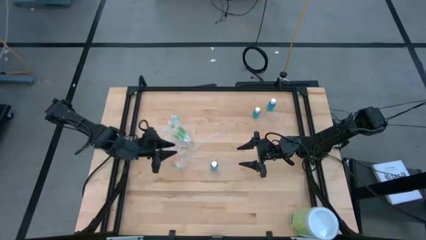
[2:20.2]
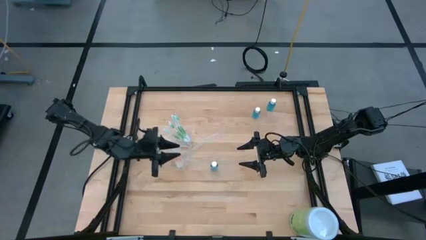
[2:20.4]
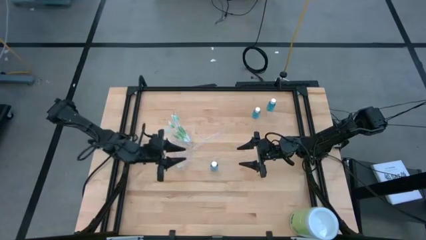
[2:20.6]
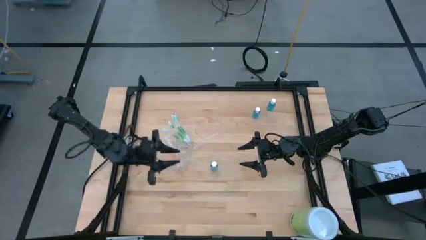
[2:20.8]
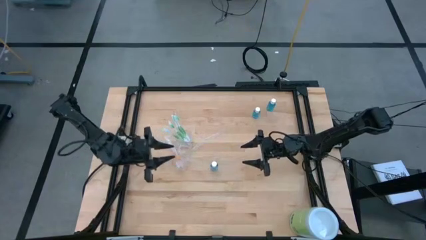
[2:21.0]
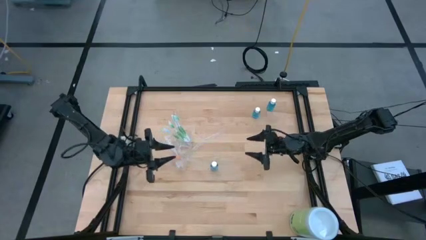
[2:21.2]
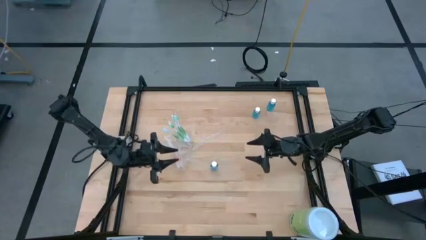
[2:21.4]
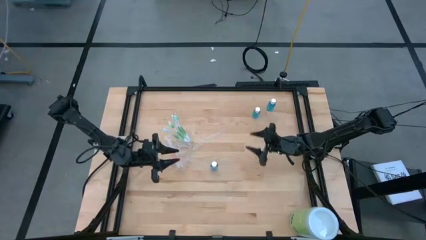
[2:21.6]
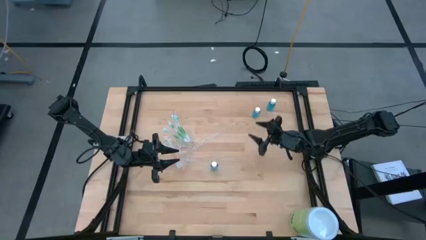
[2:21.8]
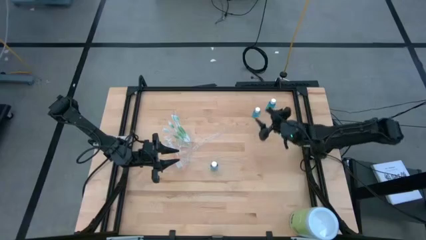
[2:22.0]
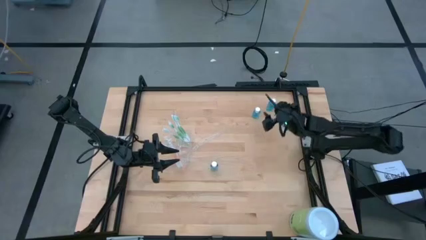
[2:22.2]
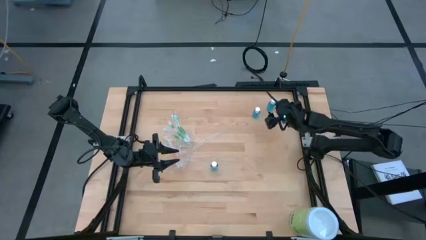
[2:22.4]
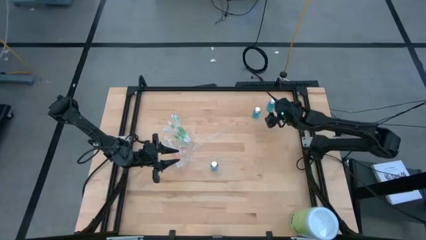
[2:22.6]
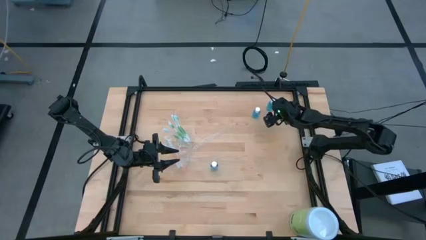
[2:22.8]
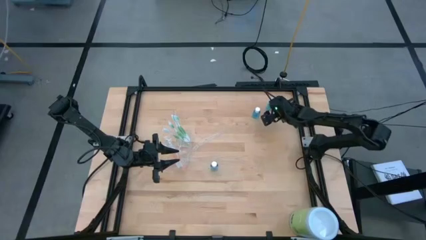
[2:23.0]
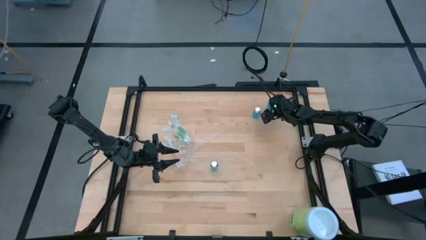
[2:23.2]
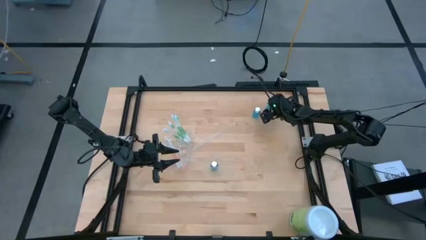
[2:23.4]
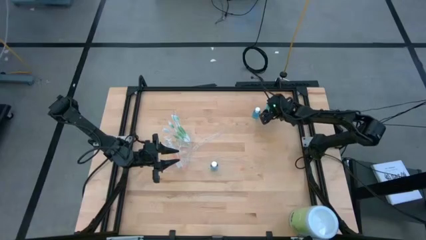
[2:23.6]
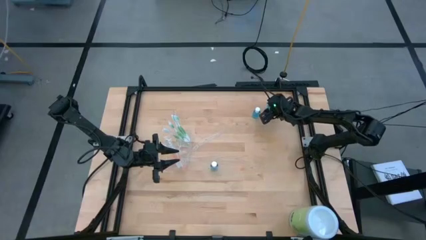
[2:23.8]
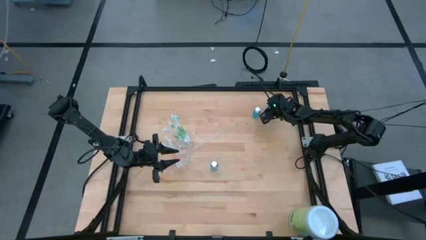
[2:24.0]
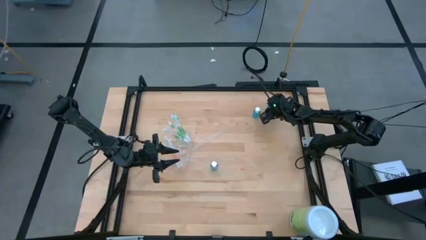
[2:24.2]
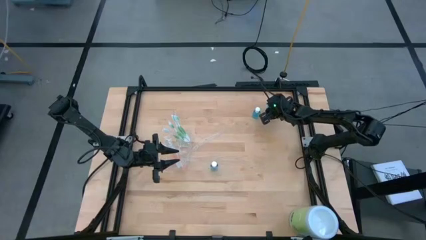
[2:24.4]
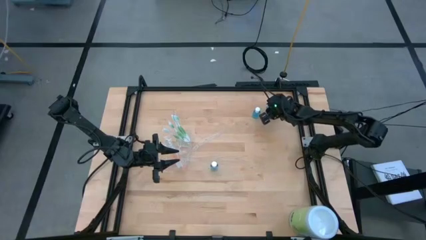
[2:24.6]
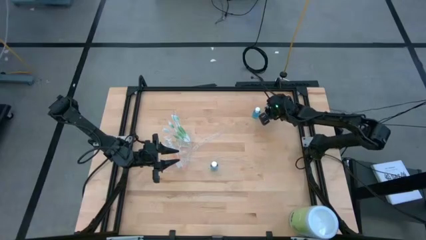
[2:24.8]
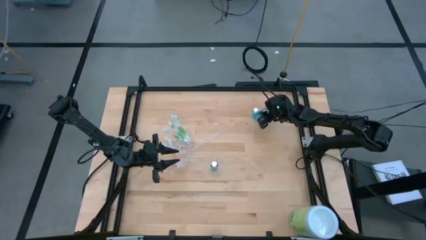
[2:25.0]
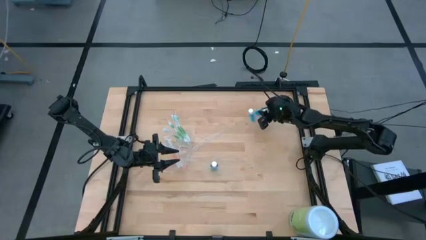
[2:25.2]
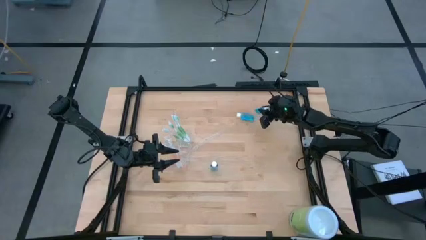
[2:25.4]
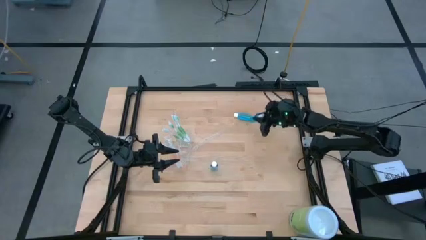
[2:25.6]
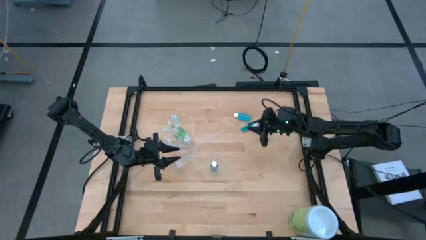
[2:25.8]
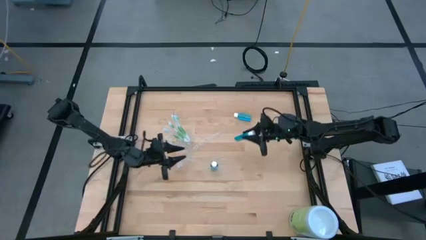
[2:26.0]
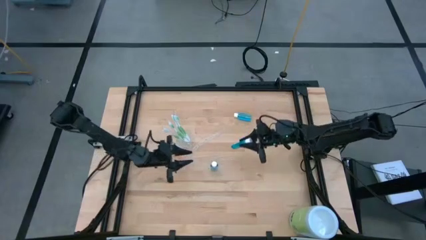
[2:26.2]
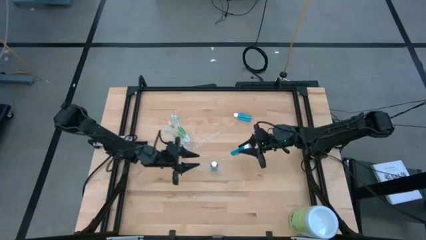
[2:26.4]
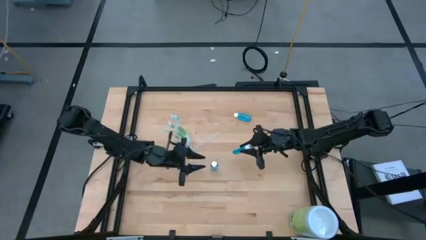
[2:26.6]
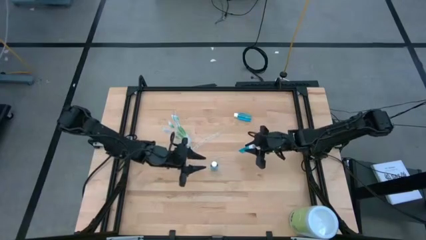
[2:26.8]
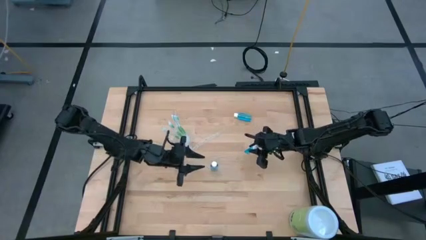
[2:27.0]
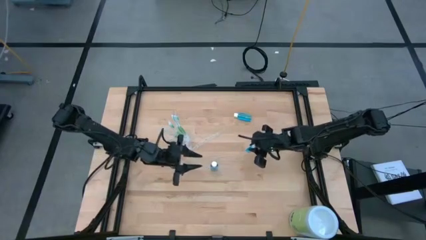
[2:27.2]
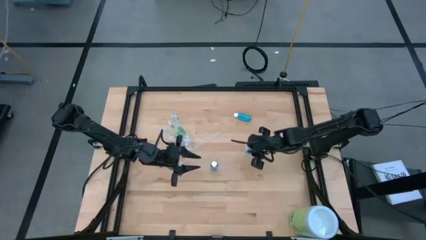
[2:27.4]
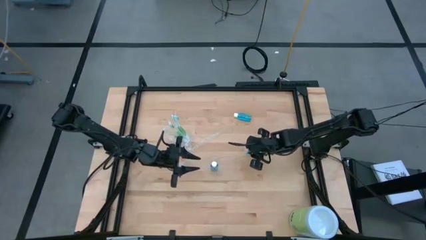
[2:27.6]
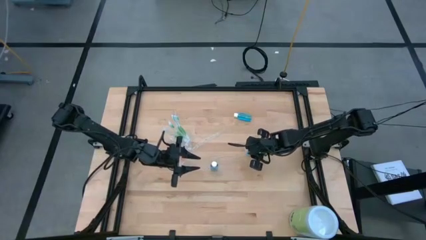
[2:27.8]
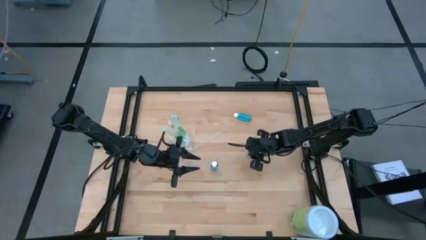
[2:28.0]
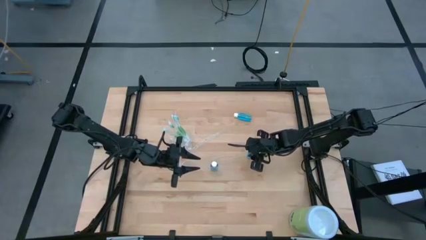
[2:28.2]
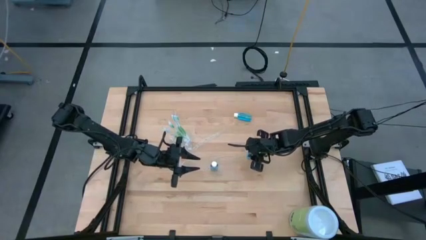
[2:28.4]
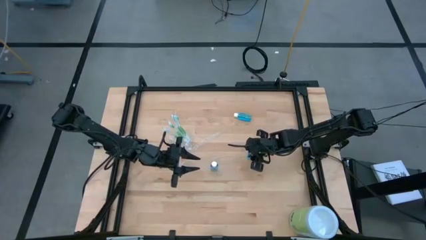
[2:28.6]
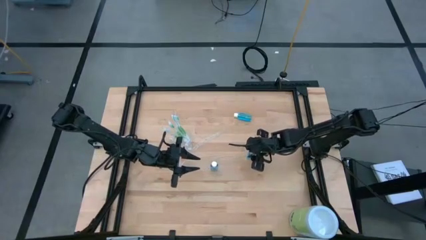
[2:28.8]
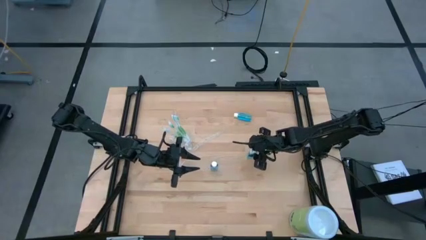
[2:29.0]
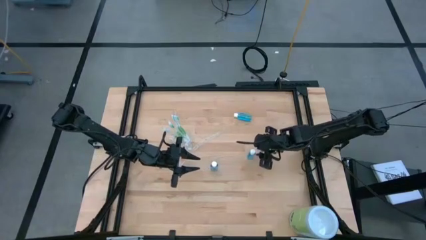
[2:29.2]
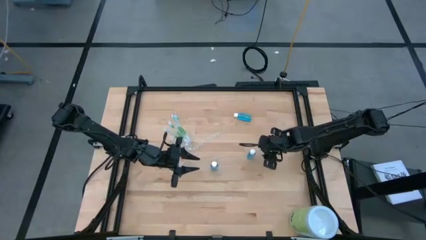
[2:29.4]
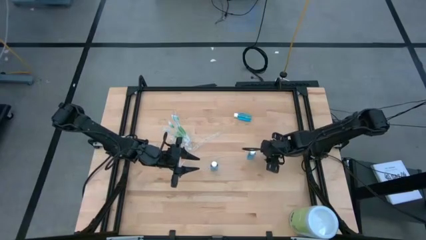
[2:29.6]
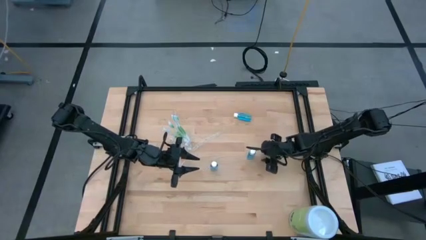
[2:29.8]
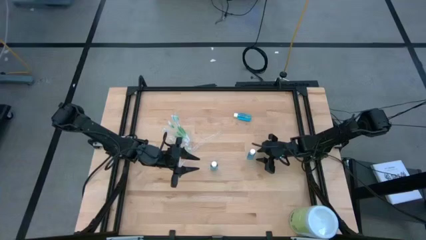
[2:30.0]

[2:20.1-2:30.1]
Task: Pick & Place toothbrushing station
Put the blue mouthwash into the middle section of the transparent organizer

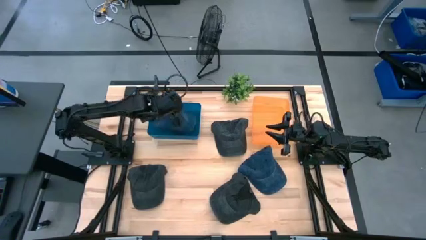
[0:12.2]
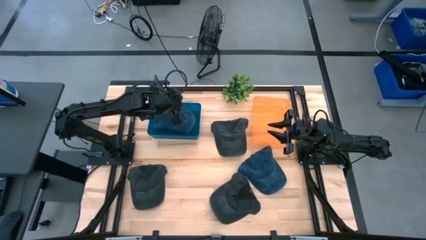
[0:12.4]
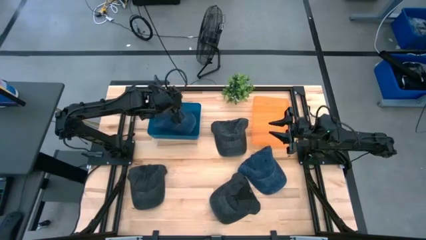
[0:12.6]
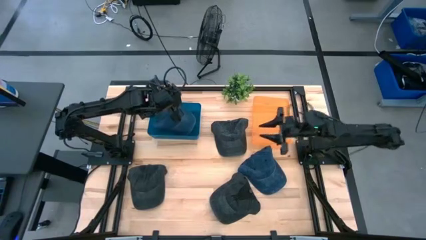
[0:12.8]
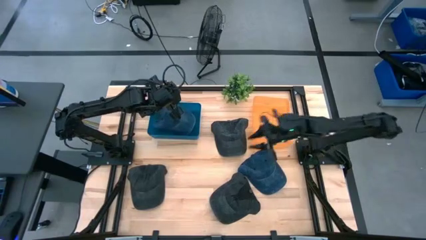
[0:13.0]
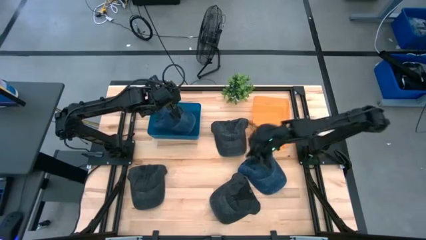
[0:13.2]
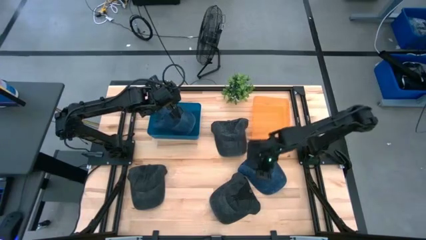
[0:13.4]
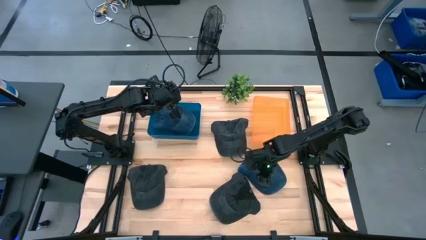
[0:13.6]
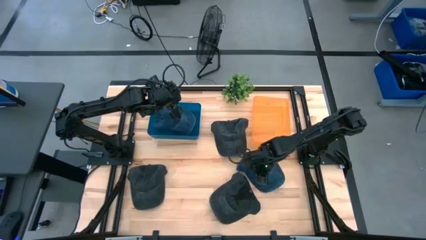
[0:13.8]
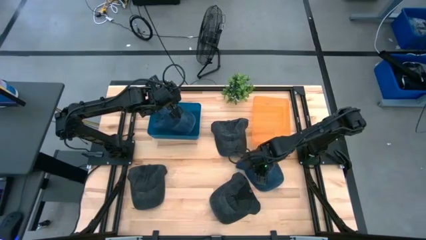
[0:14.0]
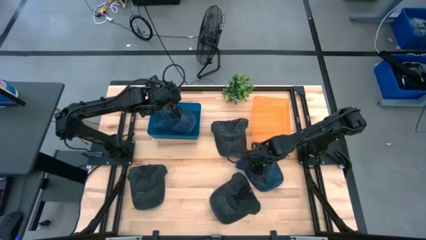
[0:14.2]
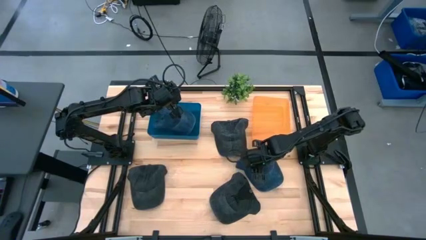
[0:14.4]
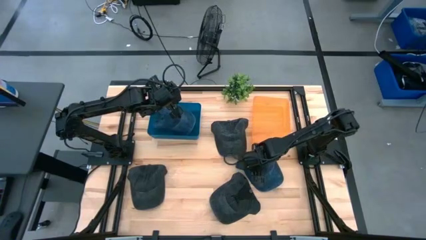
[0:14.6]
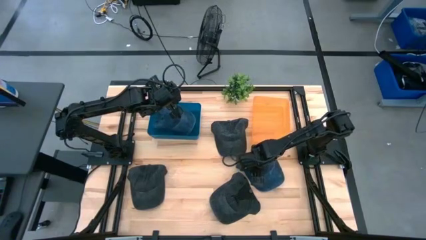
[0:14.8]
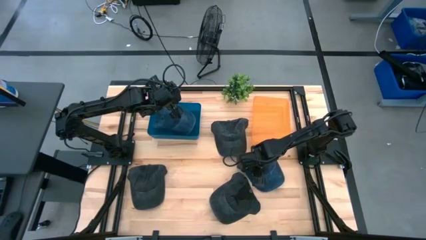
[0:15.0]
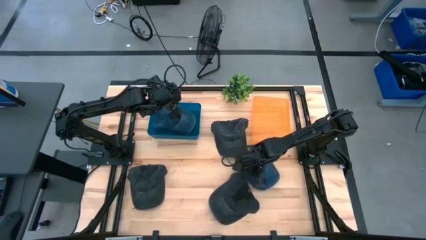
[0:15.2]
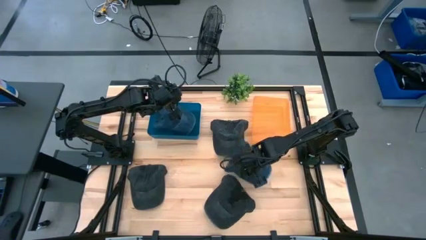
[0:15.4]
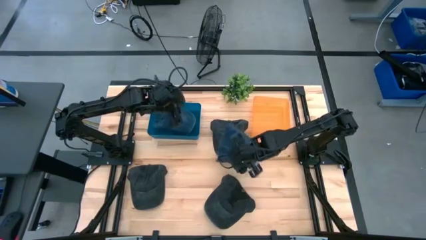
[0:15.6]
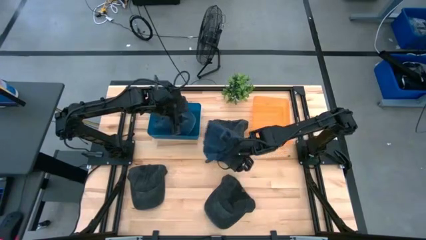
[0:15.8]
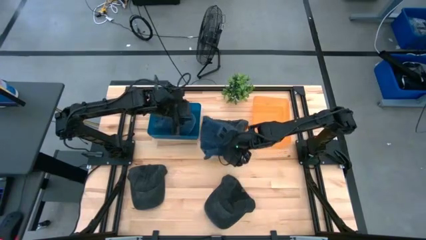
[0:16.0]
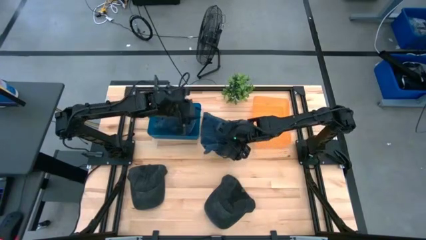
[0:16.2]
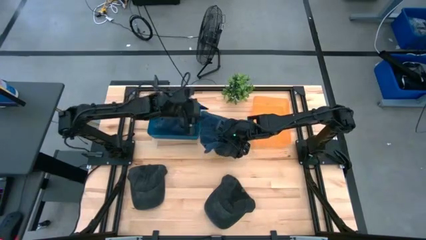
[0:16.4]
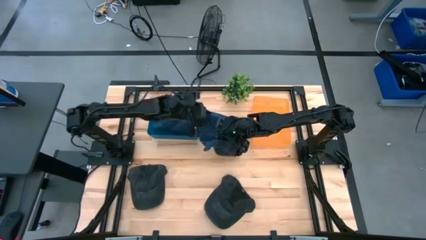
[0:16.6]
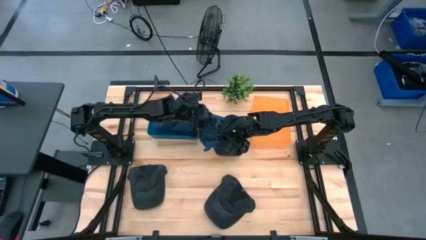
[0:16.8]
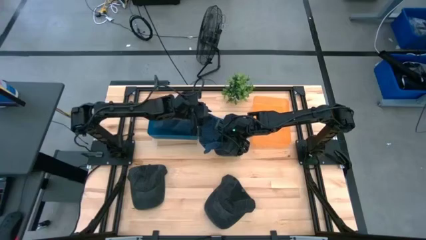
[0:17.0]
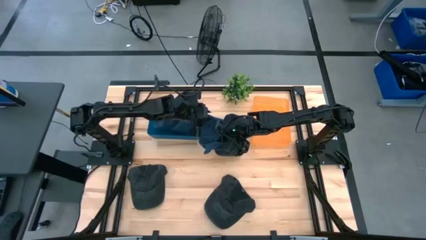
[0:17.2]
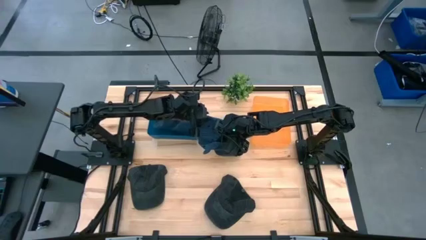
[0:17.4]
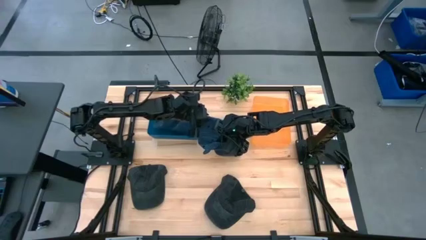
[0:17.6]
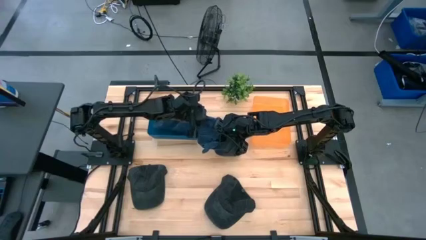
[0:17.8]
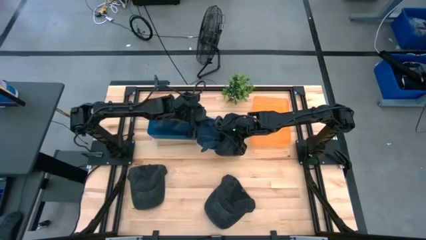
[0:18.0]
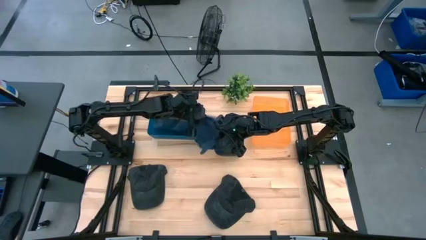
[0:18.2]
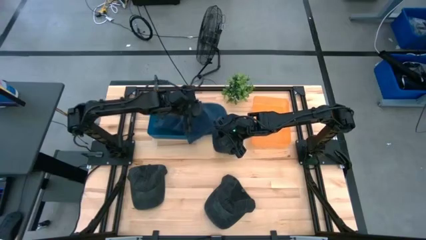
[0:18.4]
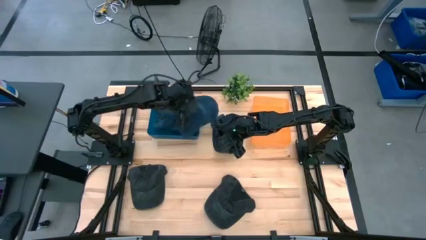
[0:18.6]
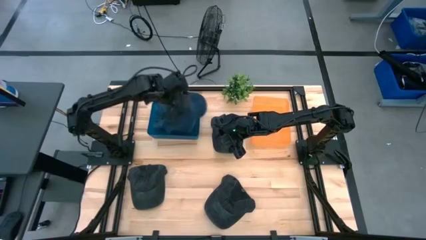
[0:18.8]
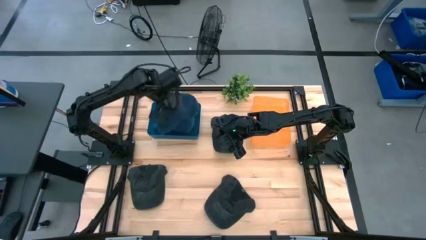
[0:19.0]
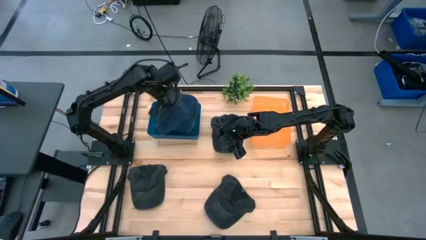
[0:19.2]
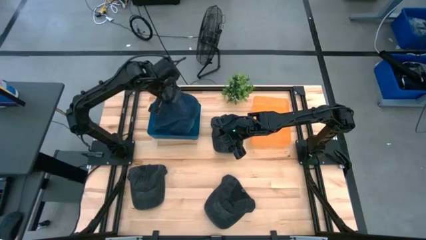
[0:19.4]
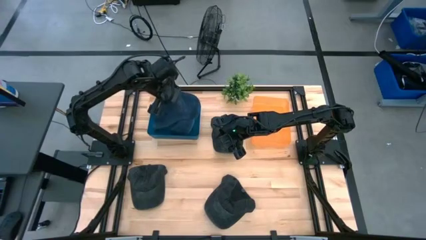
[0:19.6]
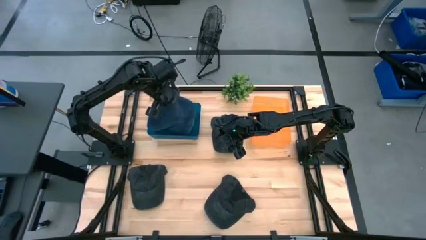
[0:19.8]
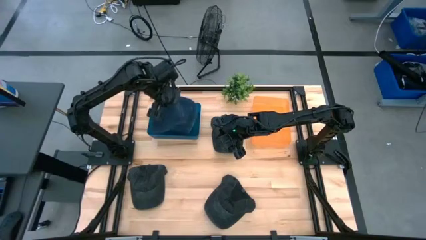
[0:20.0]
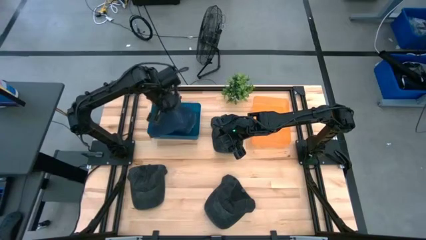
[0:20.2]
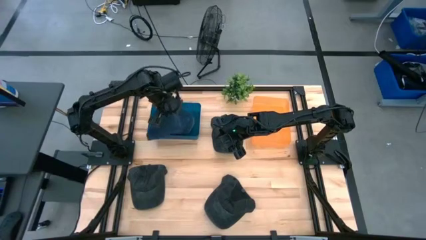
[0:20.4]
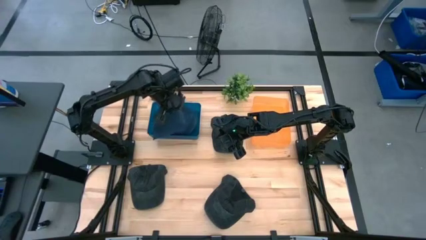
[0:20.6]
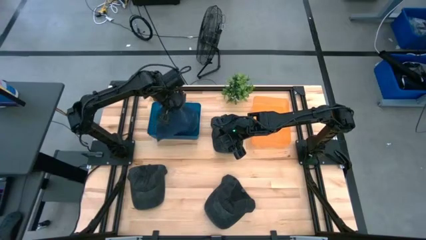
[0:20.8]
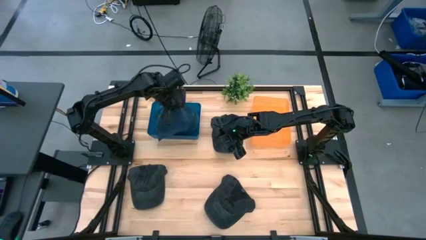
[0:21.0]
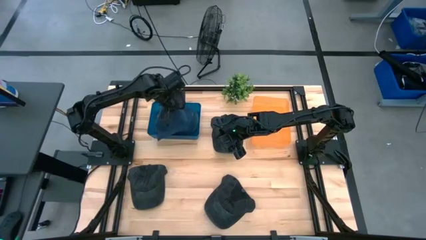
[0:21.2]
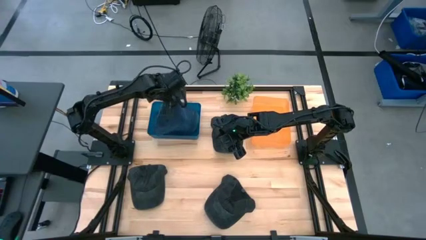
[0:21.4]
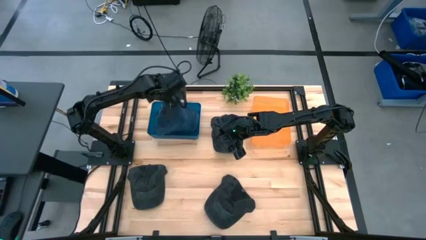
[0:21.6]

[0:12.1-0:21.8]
Task: Pick & Place hat
Put the blue cap into the blue bin
